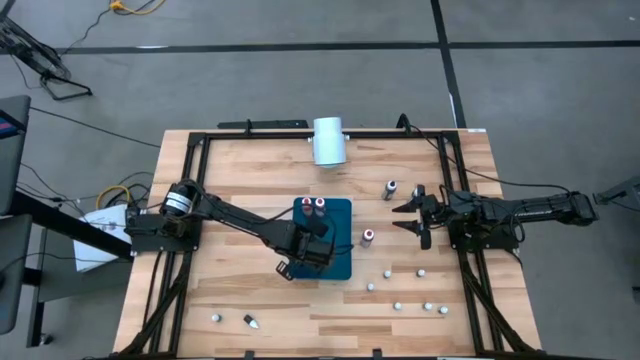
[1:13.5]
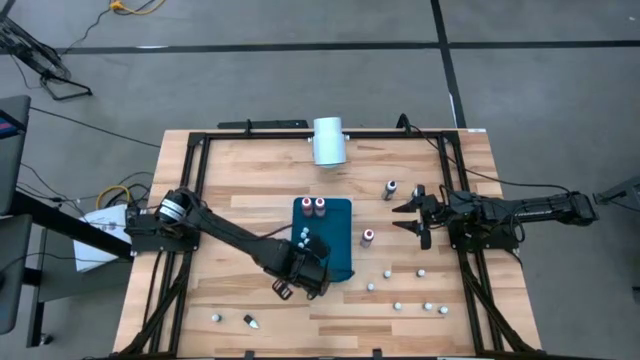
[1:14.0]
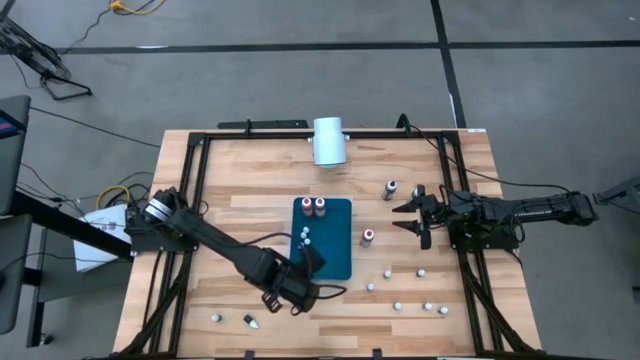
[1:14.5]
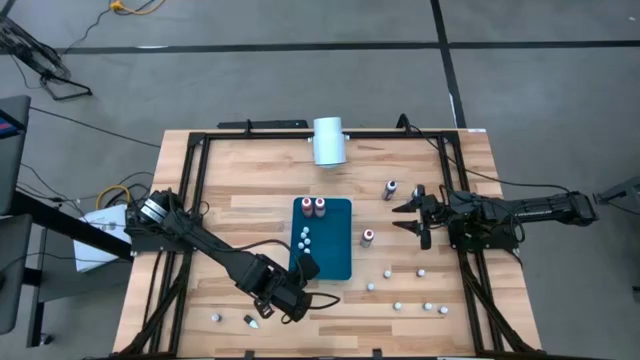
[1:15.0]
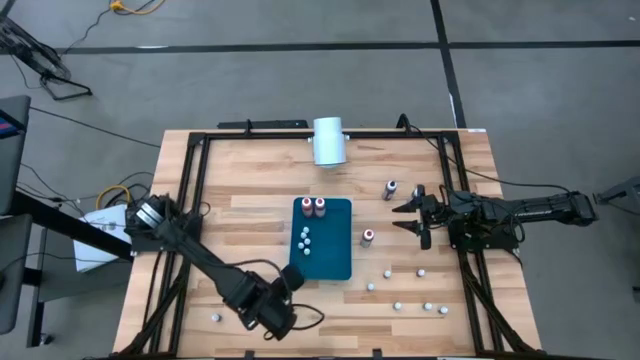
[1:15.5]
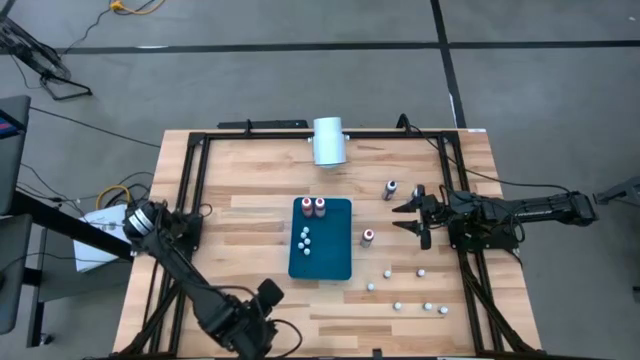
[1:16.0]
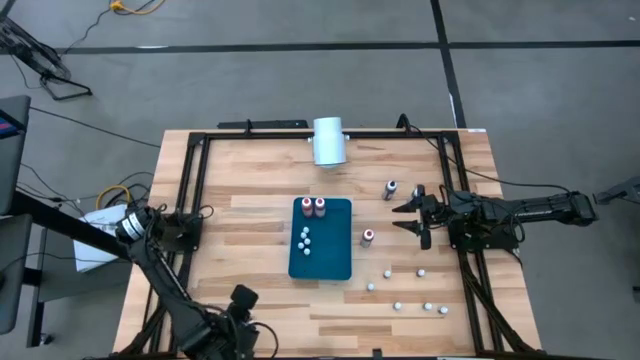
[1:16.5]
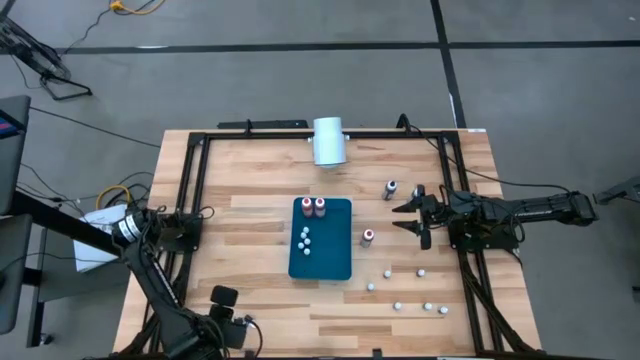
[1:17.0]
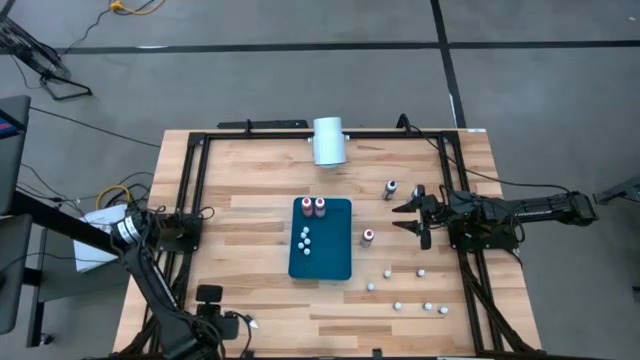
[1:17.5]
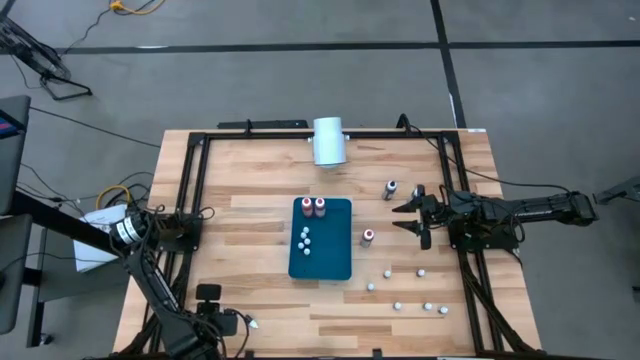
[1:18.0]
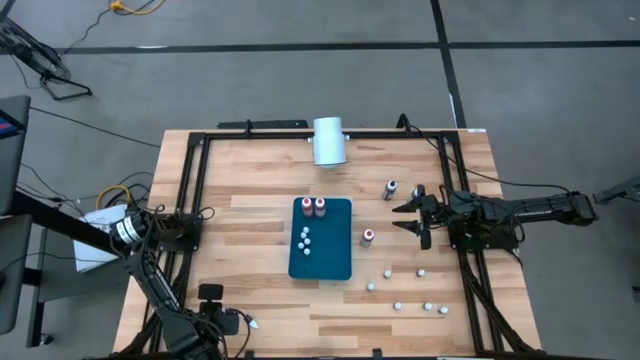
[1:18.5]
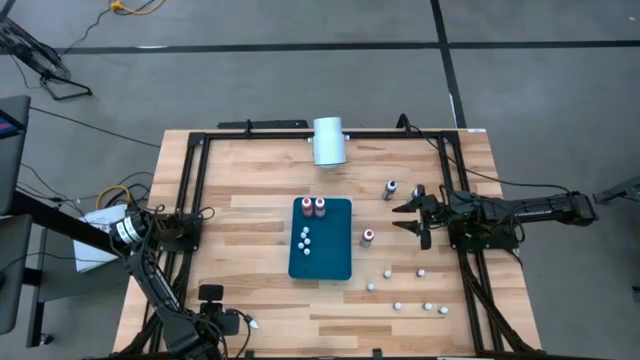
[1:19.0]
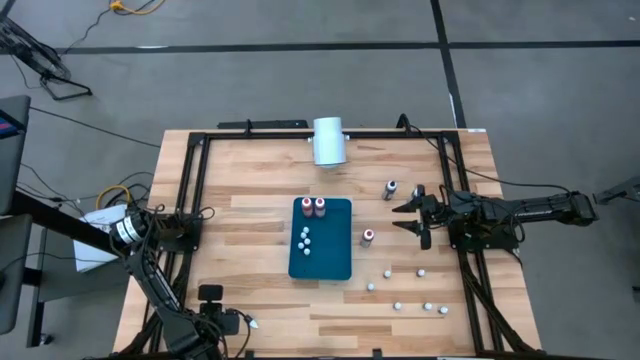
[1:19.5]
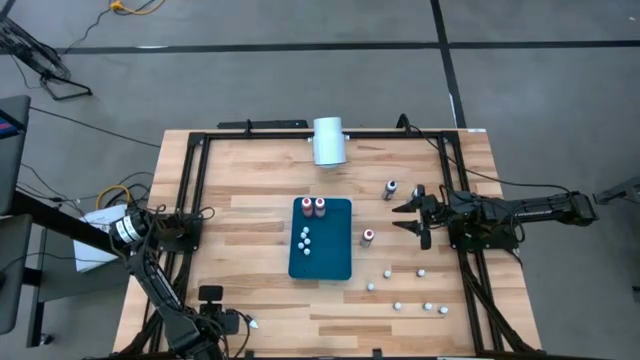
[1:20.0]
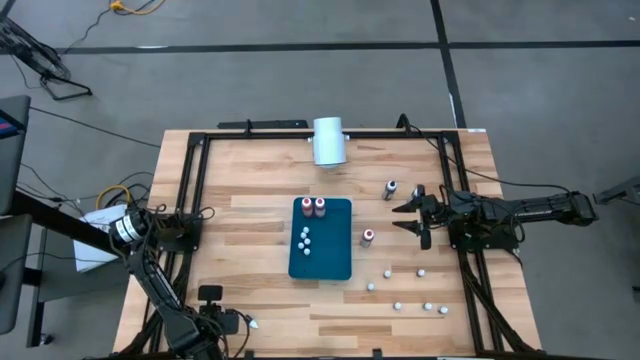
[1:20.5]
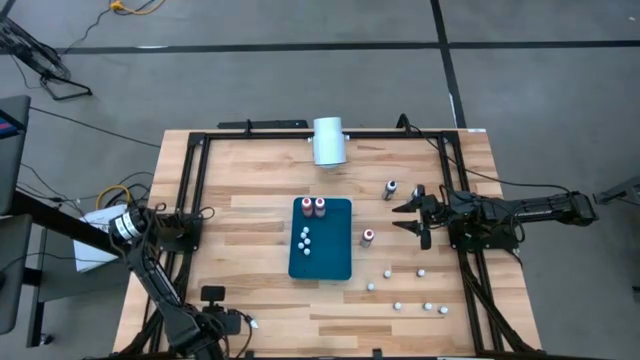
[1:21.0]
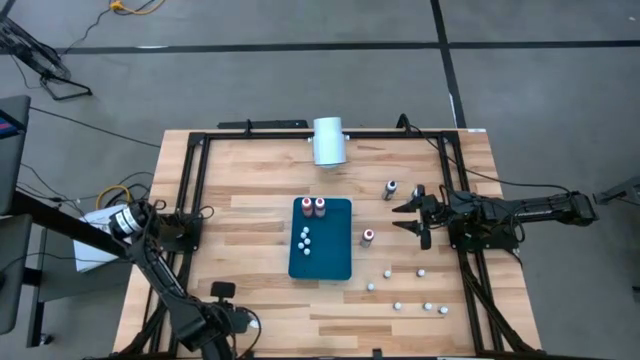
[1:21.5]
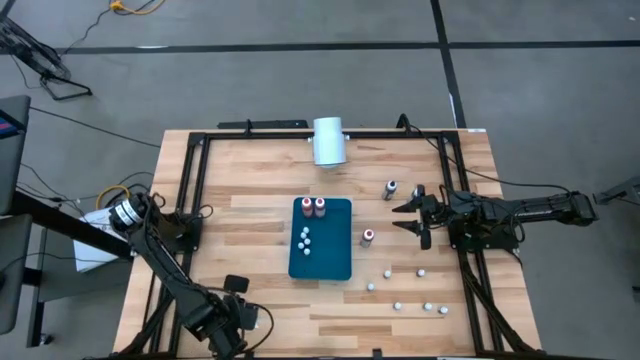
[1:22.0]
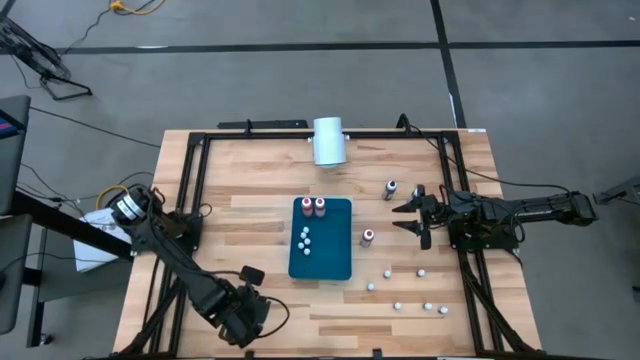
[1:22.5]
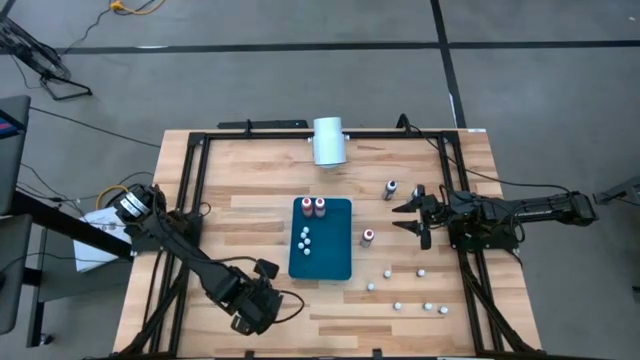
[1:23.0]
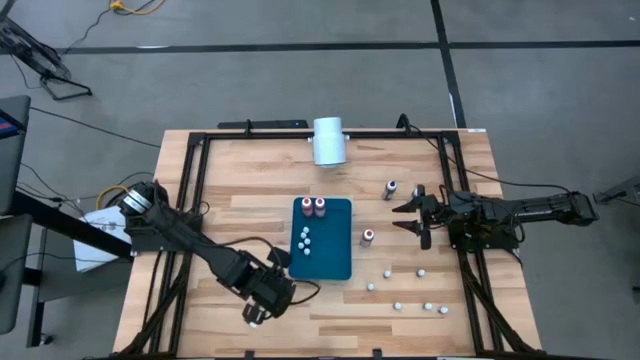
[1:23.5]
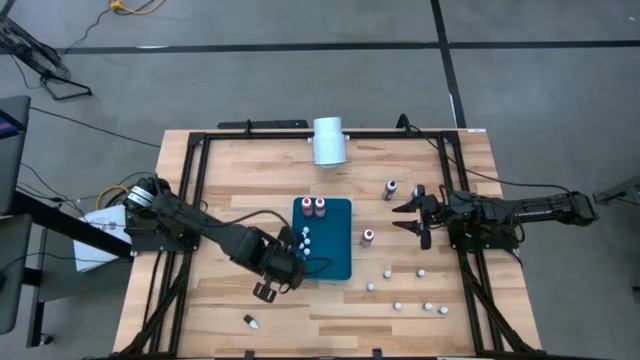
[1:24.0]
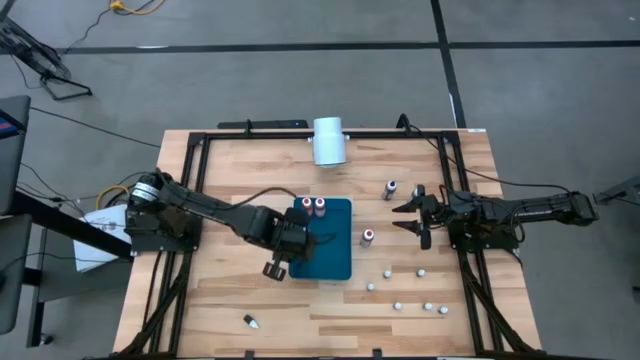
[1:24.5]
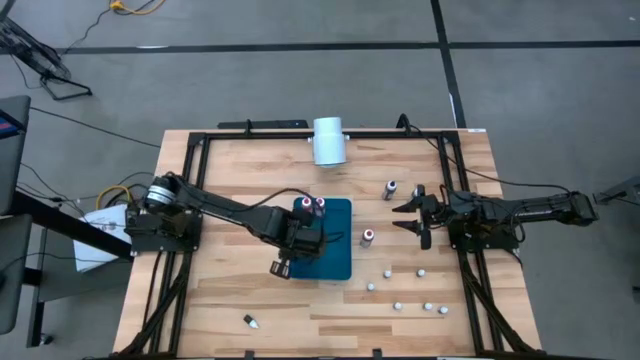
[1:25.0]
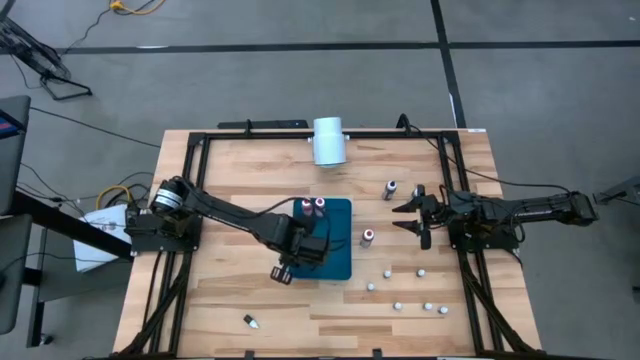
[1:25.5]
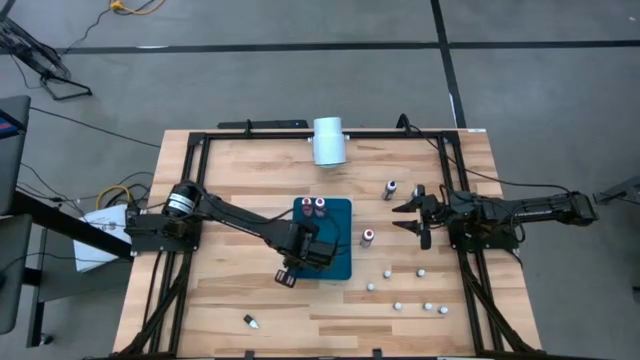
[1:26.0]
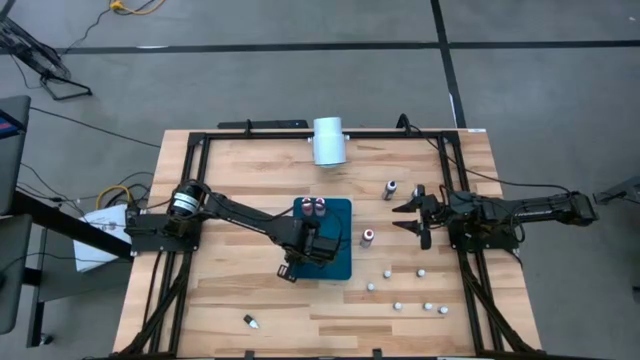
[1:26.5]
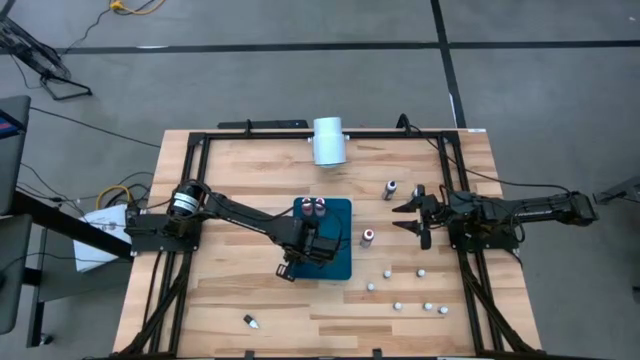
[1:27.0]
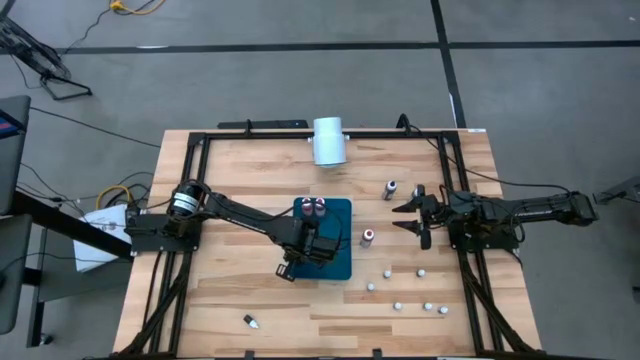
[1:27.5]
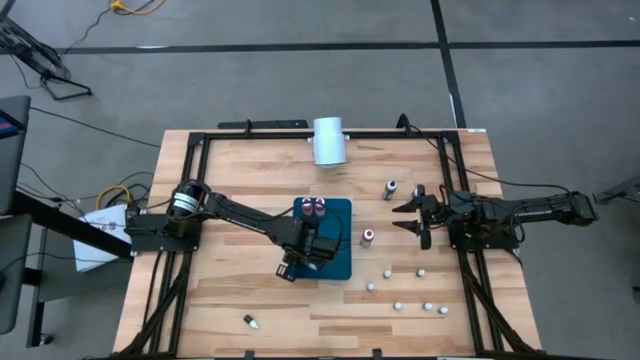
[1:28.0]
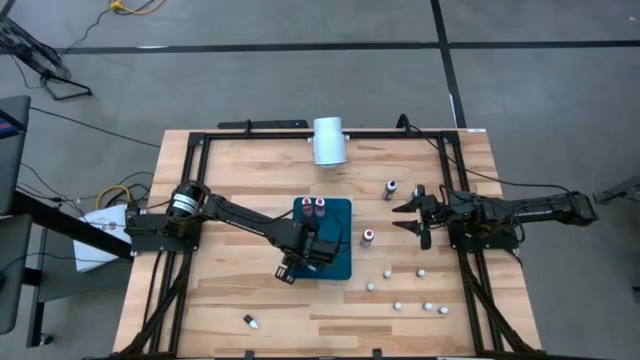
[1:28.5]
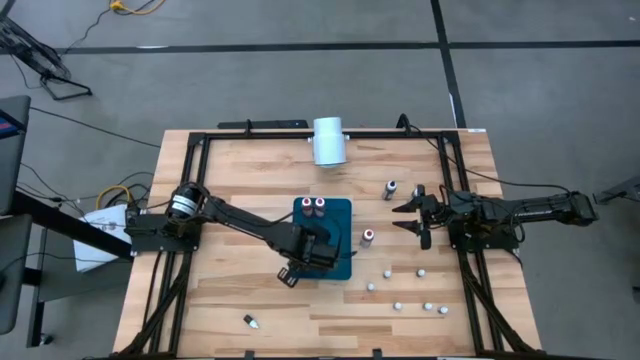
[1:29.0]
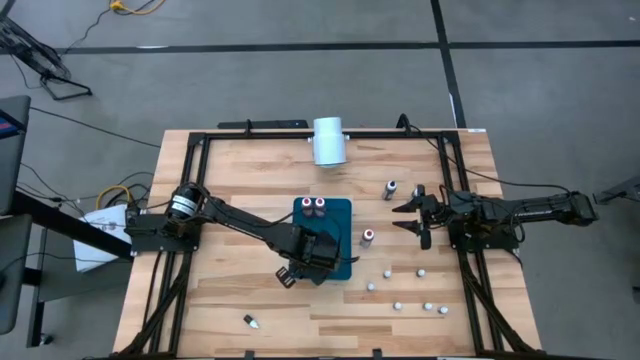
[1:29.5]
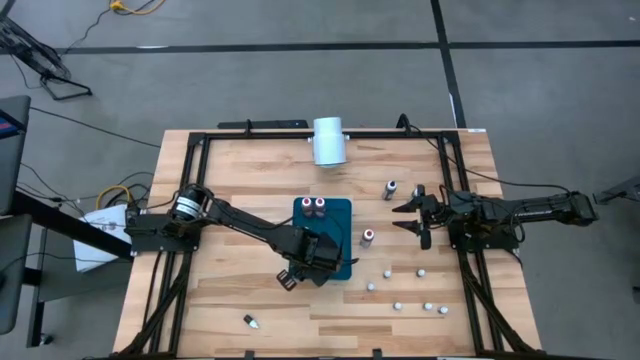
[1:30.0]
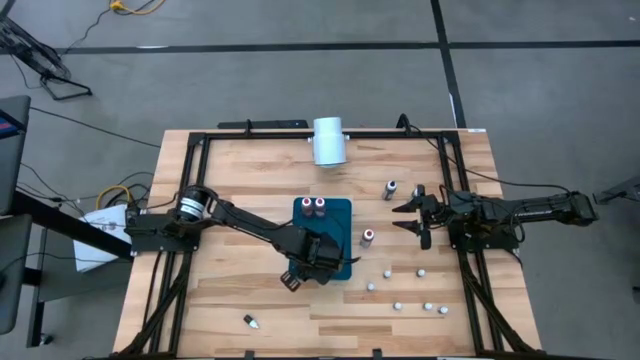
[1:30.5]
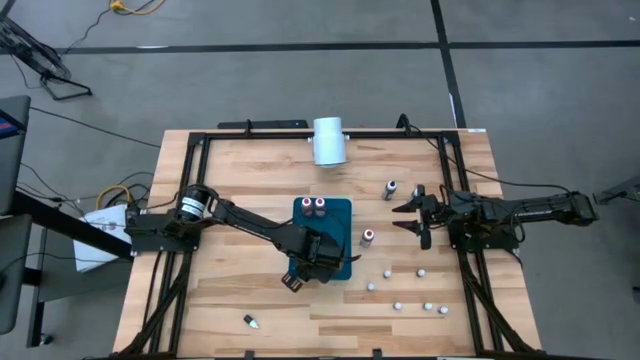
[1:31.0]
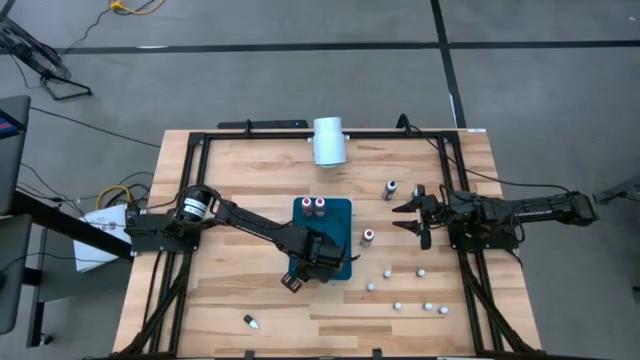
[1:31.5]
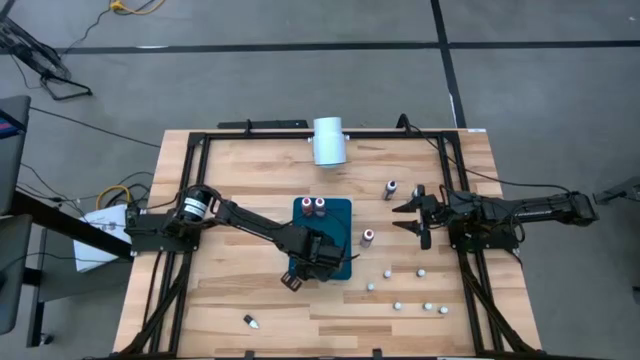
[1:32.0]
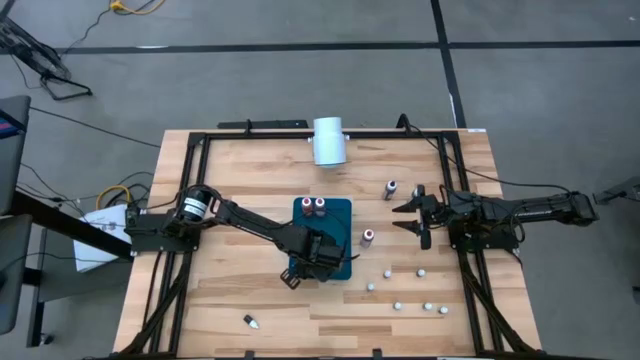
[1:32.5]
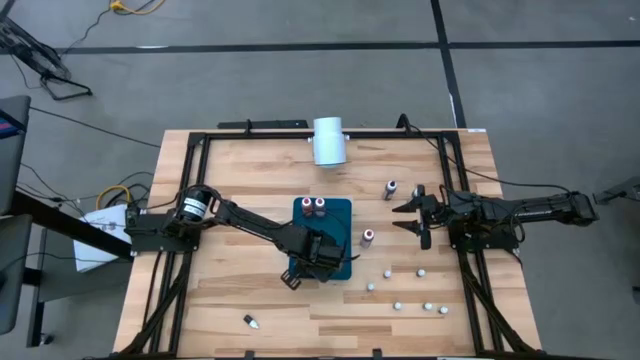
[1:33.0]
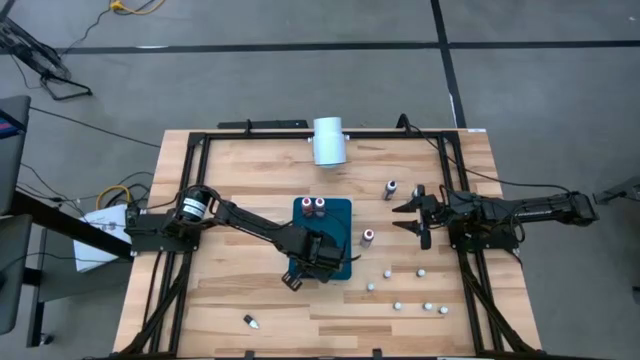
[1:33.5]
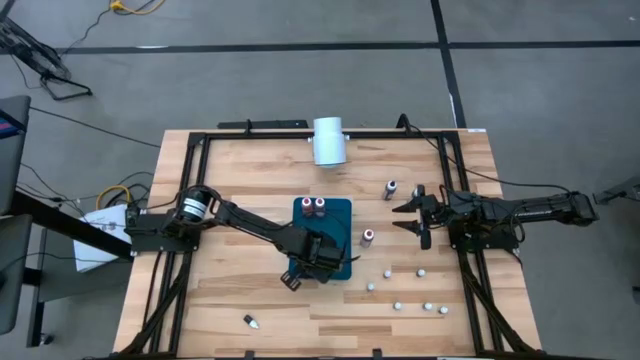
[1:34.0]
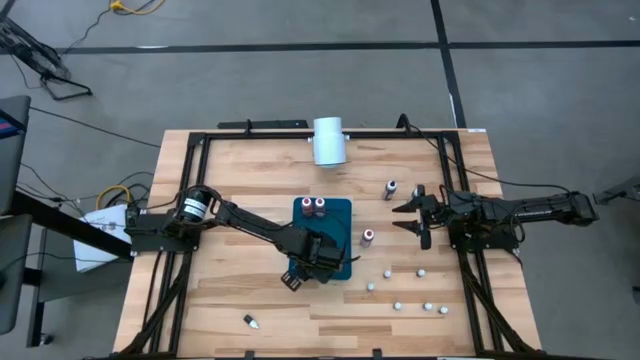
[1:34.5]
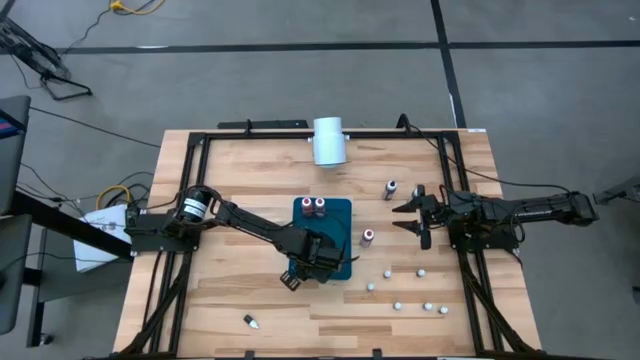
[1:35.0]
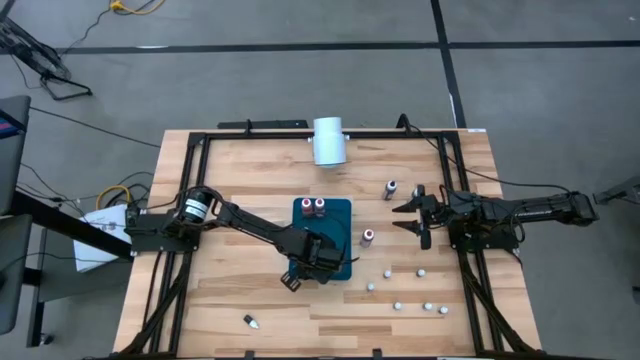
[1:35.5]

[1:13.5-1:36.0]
Task: Pick & Place food coloring
Put the small black food coloring bottle into the blue bin

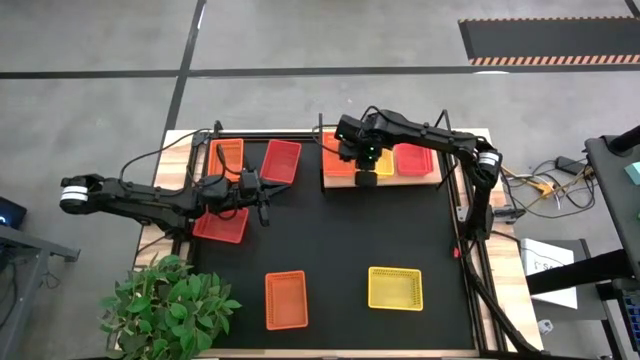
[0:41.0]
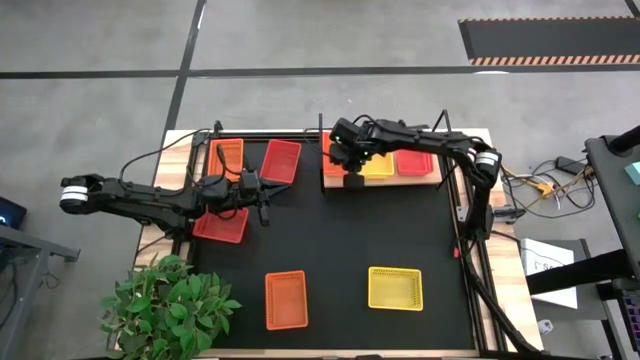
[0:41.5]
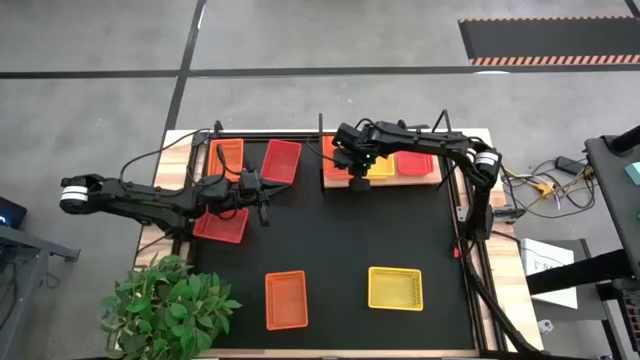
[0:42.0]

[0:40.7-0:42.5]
Task: Stack baskets on shelf by color
Adjust the orange bin on the shelf
